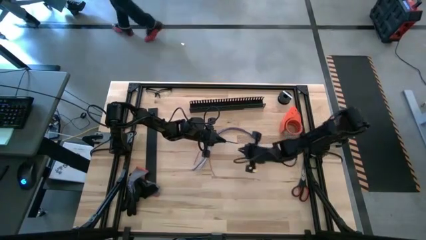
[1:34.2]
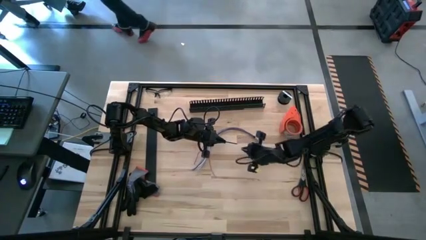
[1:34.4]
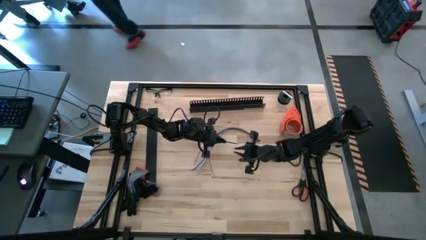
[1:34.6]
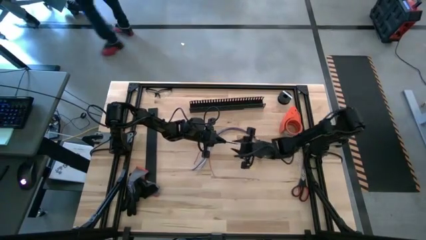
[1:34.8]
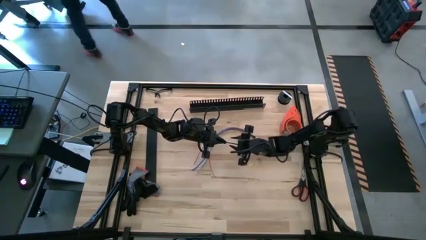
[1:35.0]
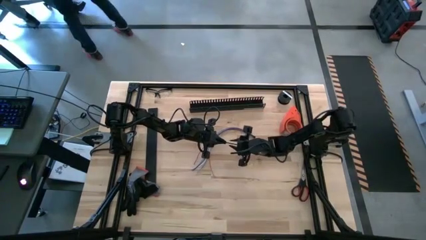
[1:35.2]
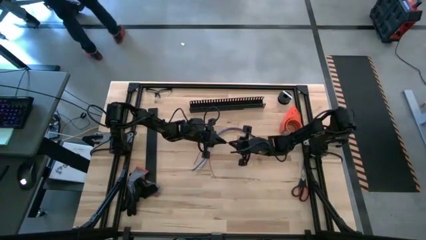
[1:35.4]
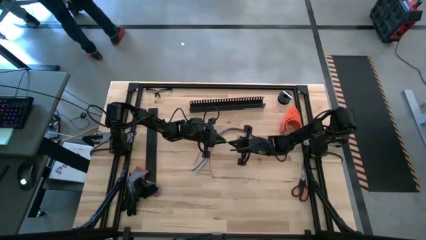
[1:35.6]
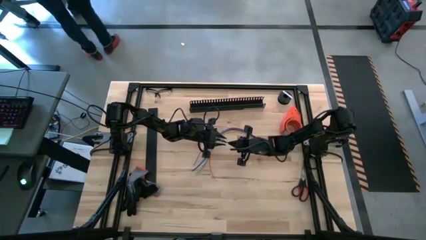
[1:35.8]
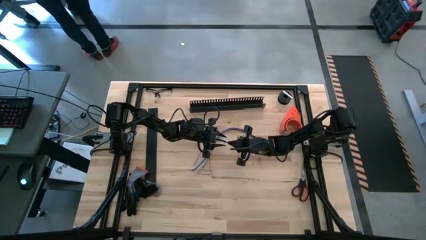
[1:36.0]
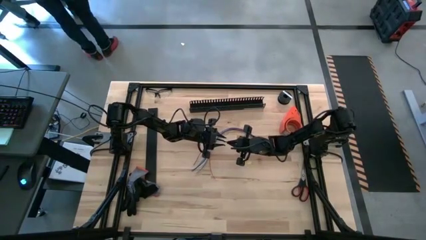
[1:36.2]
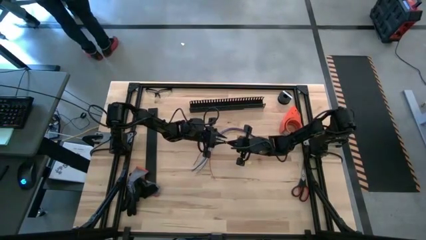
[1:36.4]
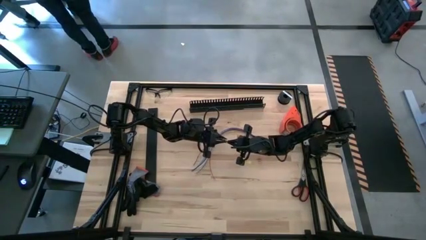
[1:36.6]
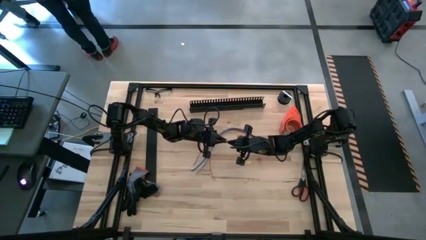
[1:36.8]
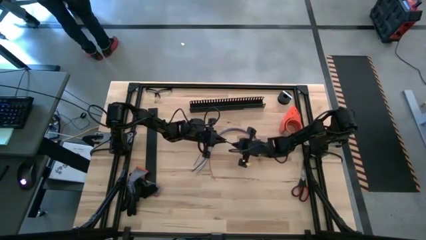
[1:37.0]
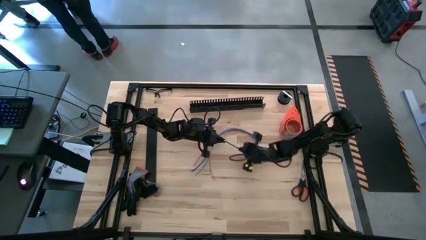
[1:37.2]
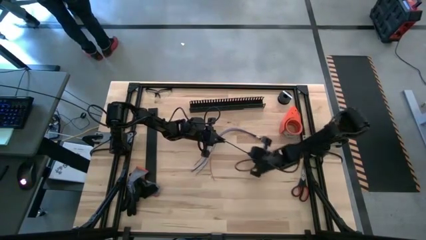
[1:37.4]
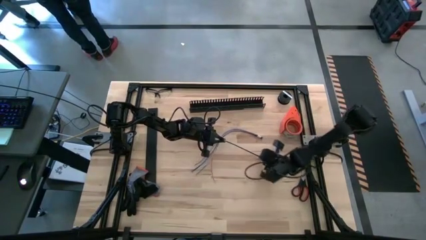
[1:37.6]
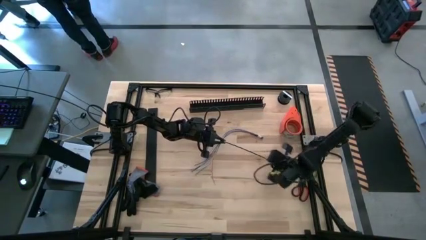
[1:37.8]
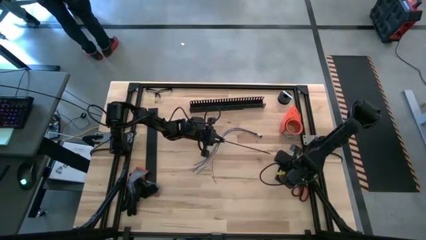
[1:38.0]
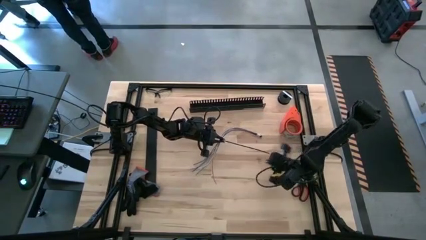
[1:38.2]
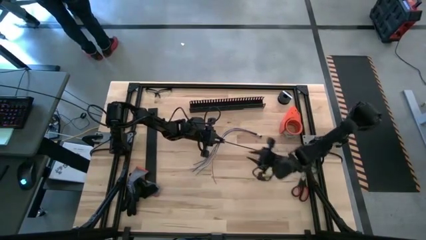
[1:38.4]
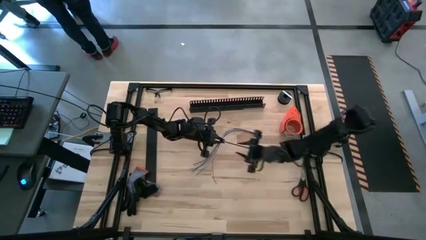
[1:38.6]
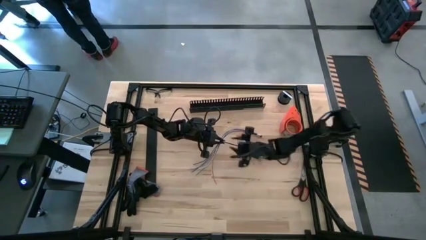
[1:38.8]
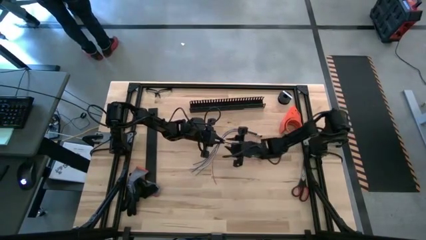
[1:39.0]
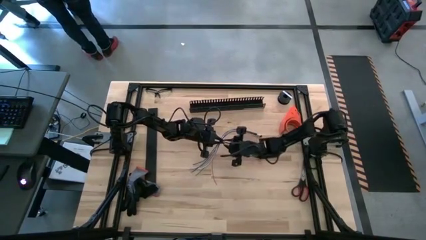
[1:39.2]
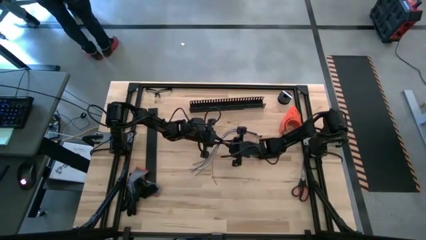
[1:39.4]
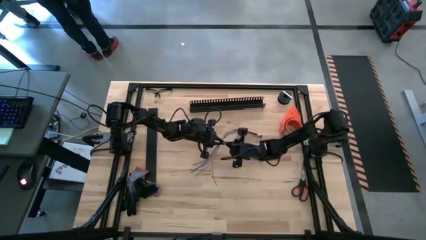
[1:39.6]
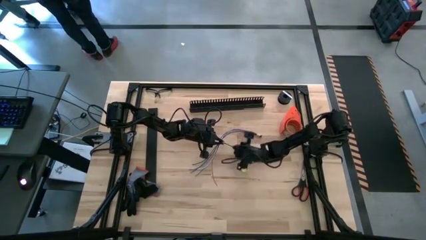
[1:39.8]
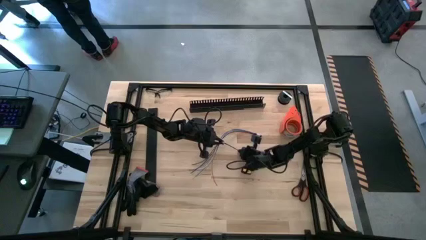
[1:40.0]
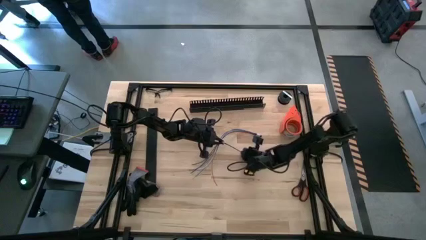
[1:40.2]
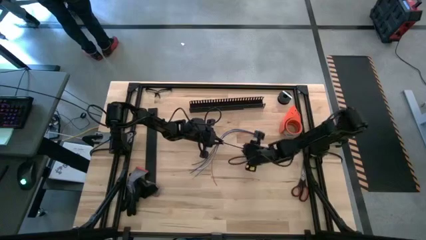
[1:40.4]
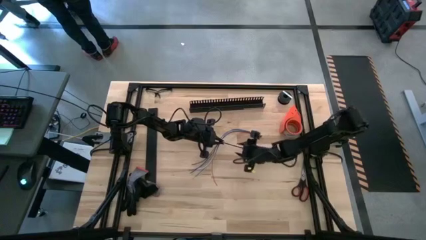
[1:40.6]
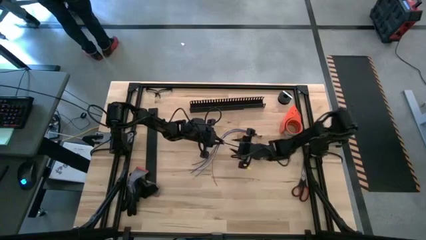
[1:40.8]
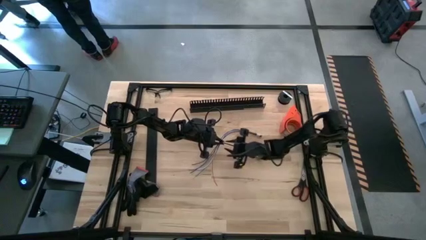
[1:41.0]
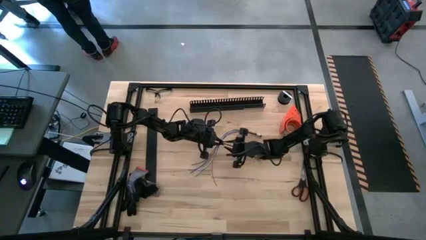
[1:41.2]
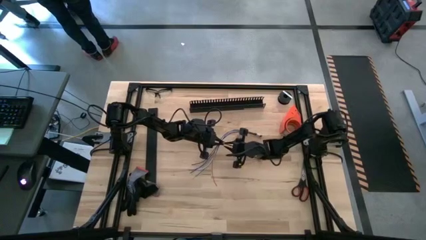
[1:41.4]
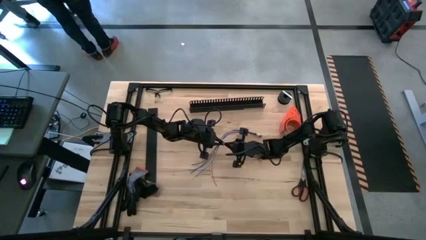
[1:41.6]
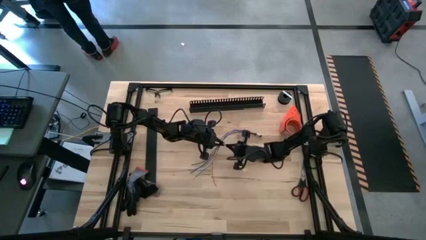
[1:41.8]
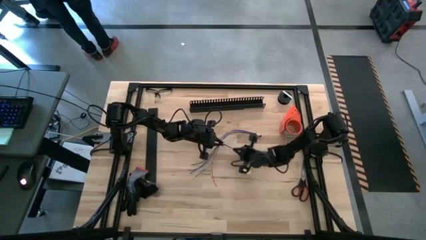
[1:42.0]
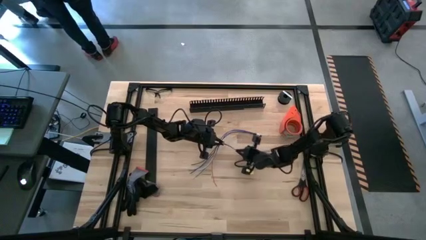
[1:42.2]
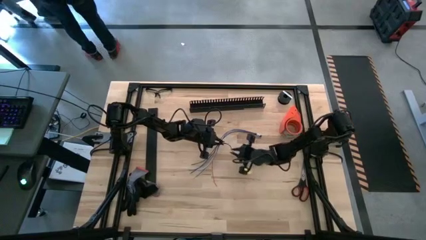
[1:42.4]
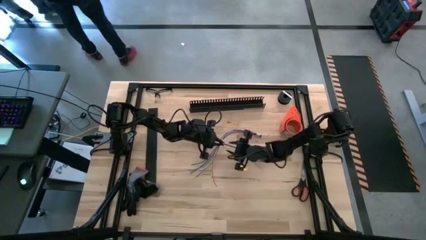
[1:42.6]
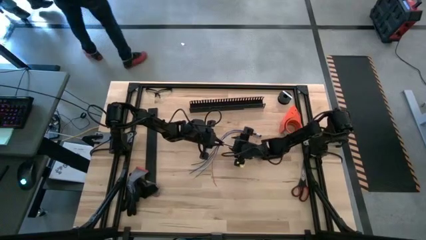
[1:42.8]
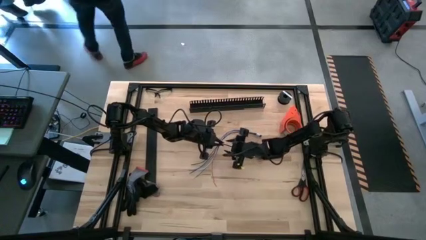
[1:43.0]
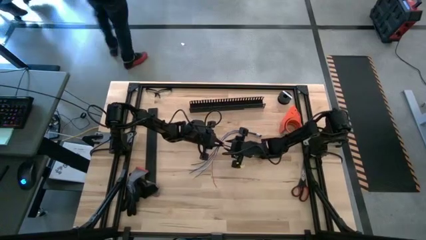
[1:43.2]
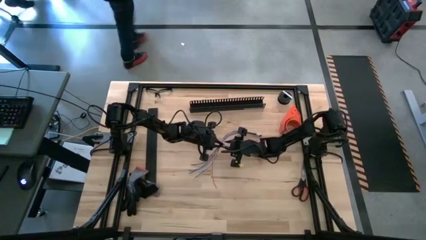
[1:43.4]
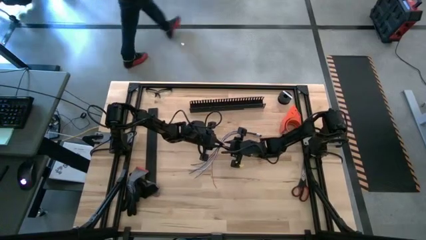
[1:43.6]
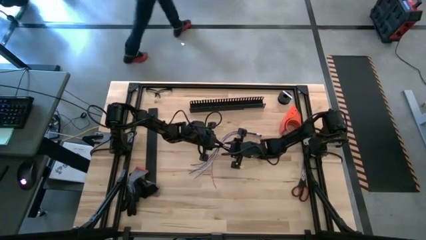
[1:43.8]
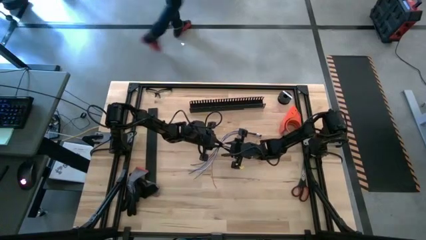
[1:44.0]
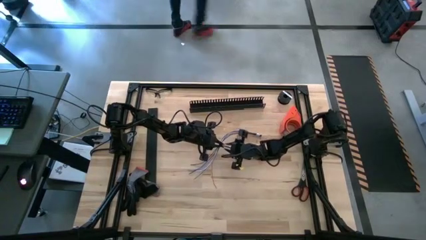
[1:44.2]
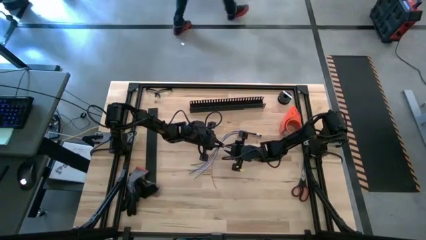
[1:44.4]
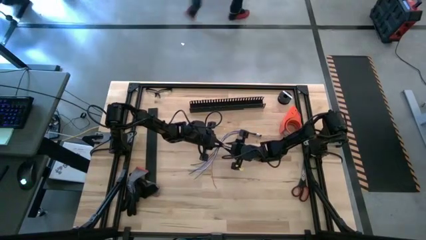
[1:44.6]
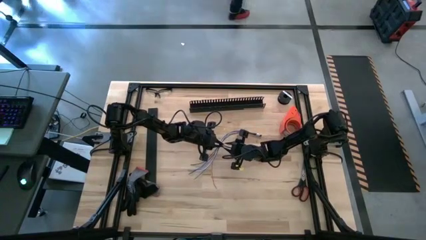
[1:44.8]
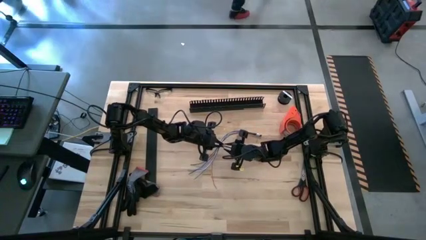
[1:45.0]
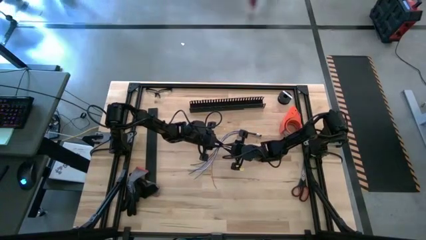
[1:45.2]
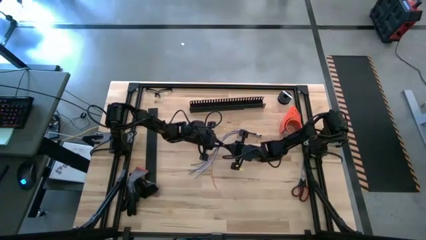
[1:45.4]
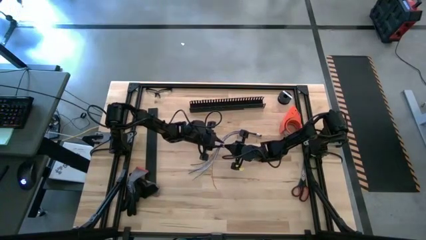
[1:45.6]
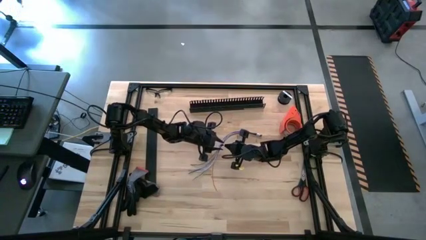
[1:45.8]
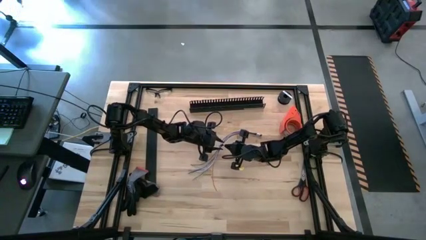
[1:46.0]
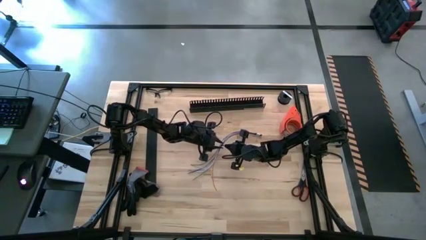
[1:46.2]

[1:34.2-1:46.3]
Task: Ziptie cables
Wrap the zip tie around the cable wire

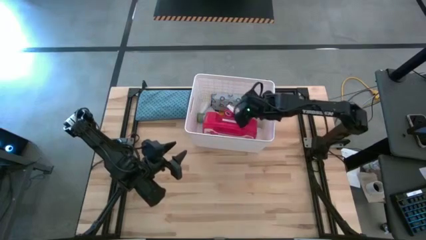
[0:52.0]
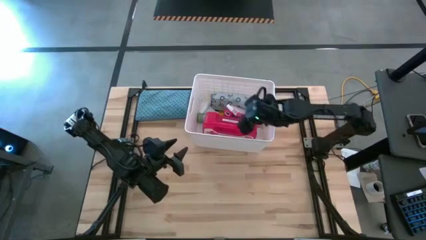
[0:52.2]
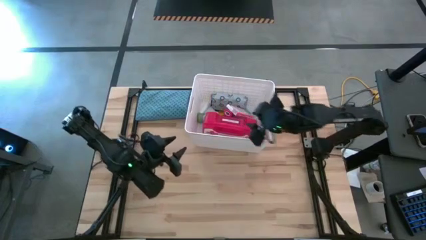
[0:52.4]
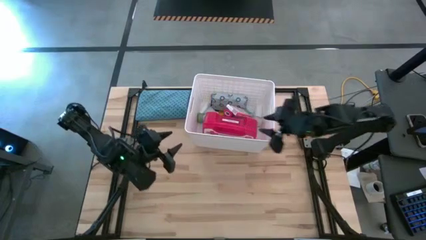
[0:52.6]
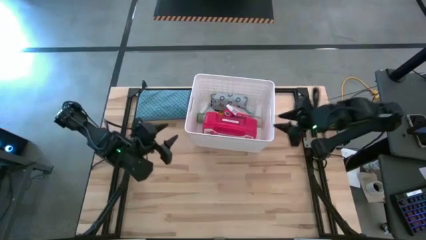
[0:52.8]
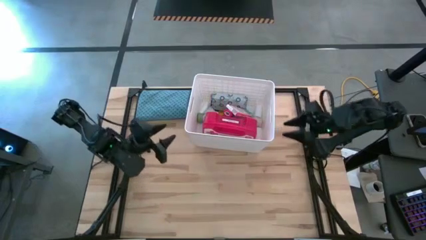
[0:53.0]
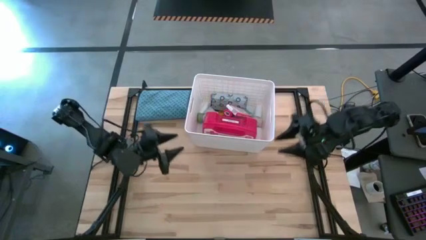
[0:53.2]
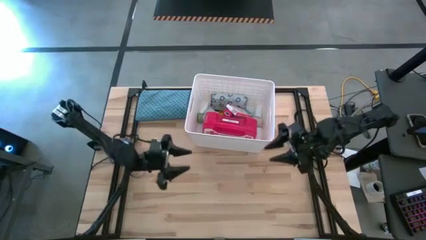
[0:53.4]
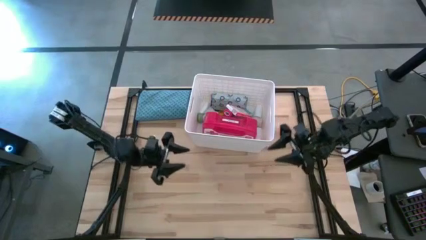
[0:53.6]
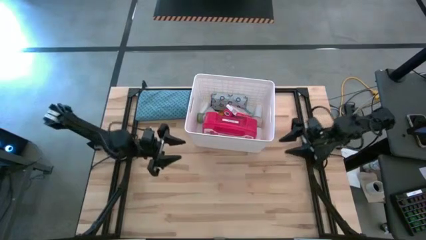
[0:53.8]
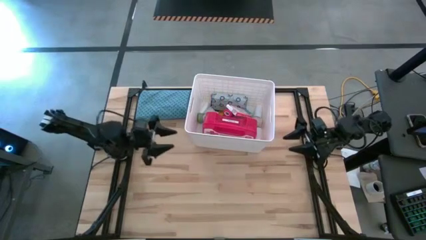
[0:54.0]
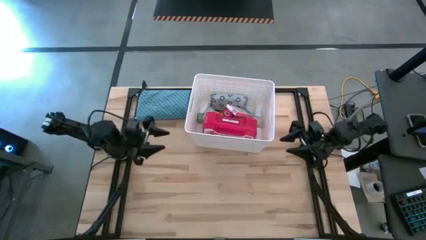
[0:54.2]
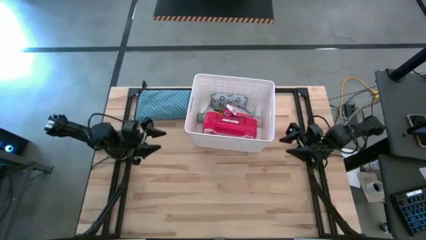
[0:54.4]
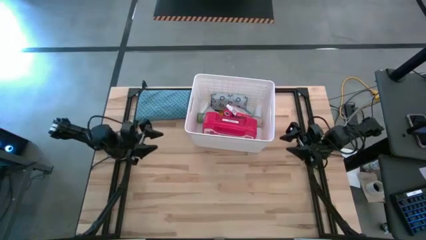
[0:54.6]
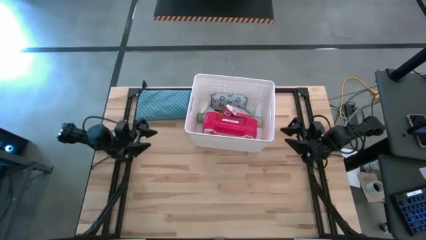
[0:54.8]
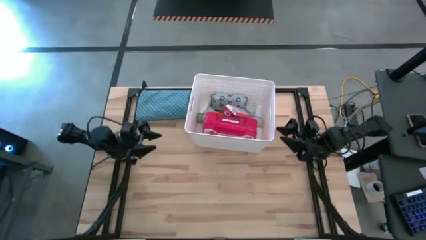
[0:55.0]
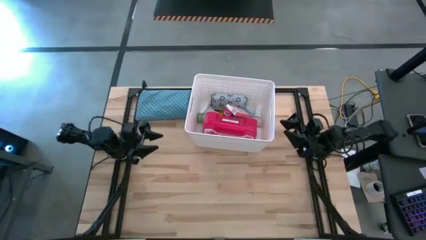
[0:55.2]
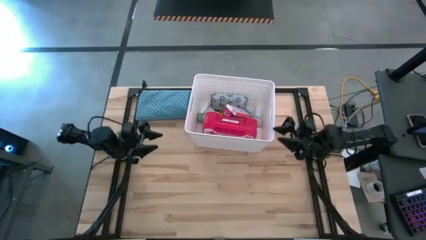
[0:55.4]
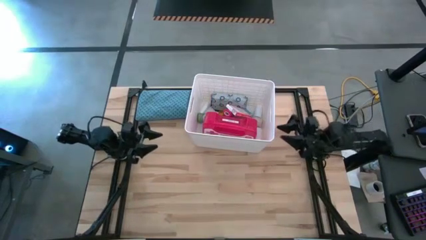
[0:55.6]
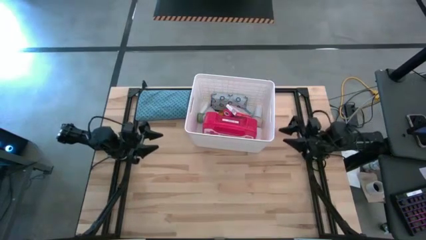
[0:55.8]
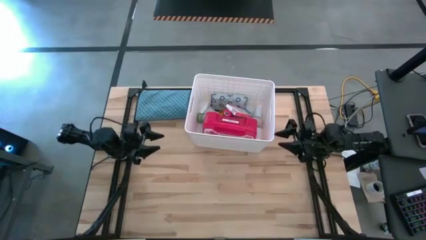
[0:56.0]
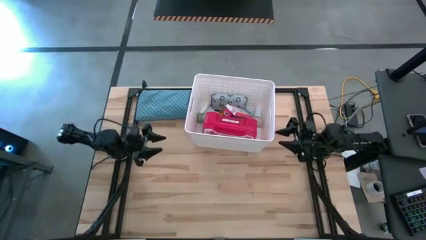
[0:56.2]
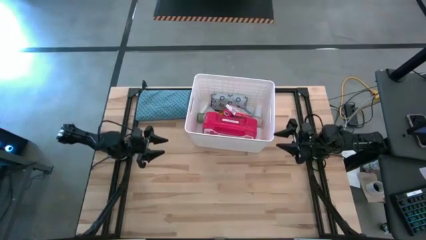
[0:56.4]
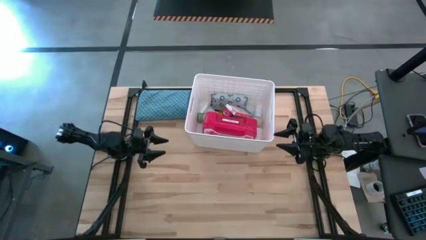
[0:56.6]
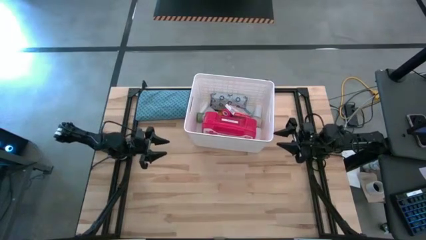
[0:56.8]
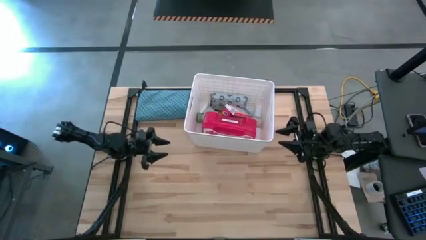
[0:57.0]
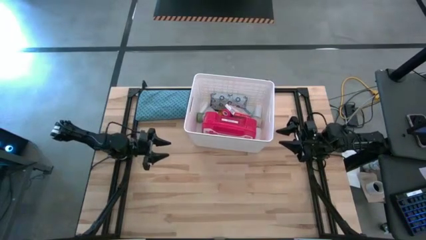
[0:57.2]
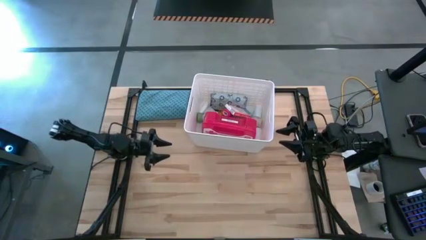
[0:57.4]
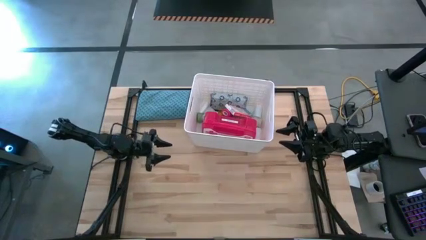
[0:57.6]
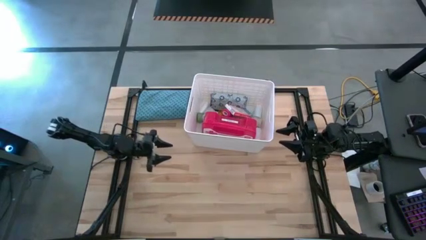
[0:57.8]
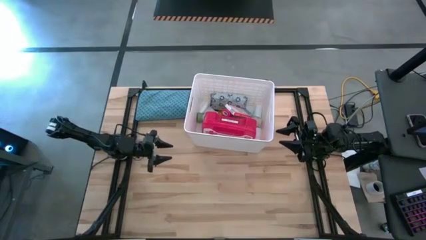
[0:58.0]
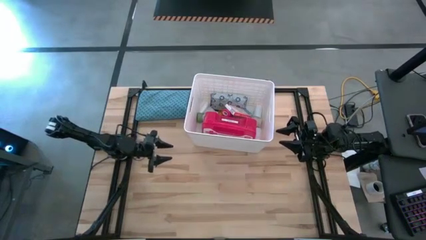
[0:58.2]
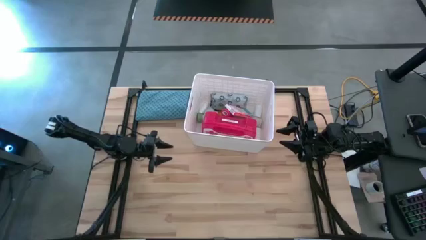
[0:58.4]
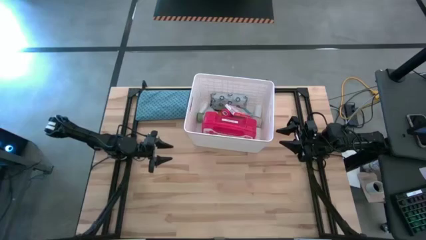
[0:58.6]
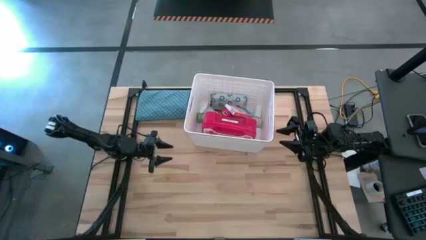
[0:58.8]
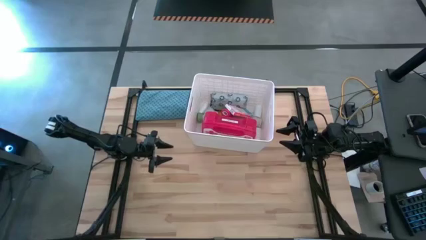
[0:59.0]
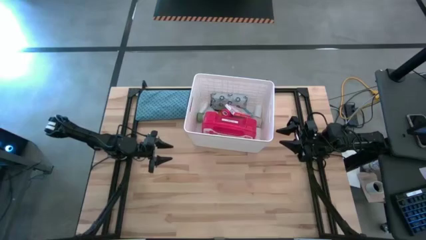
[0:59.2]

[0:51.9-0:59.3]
Task: Pick & place medical supplies in basket/bin
Return to Home position
